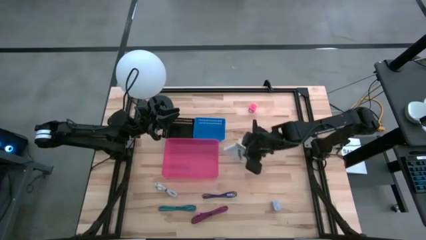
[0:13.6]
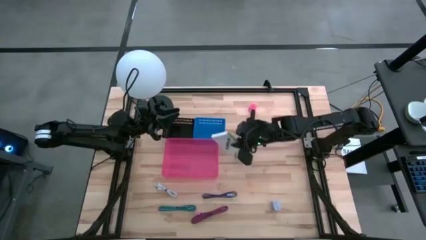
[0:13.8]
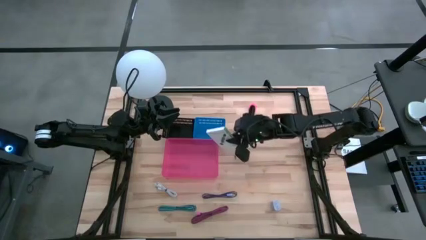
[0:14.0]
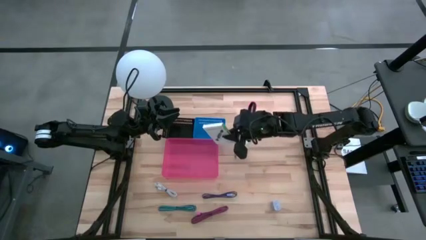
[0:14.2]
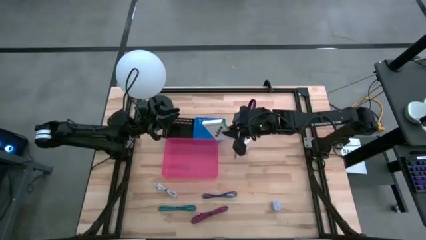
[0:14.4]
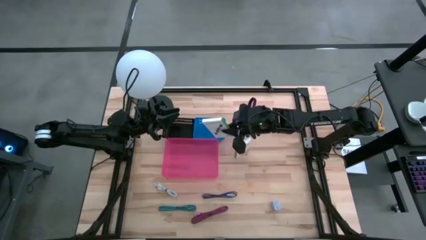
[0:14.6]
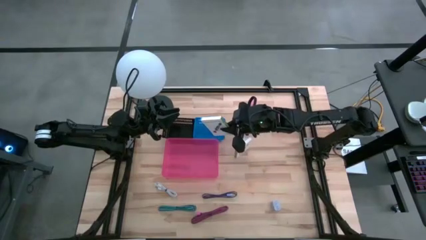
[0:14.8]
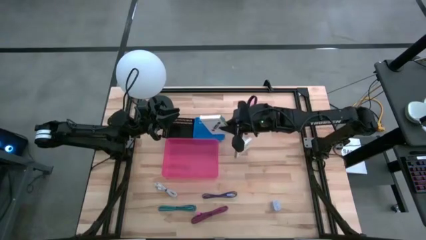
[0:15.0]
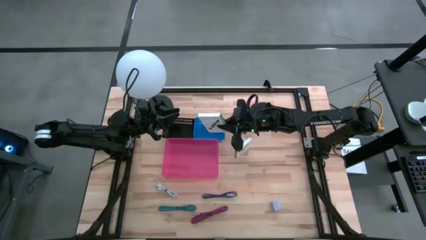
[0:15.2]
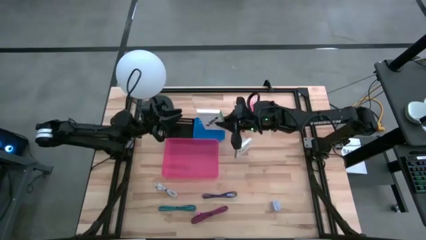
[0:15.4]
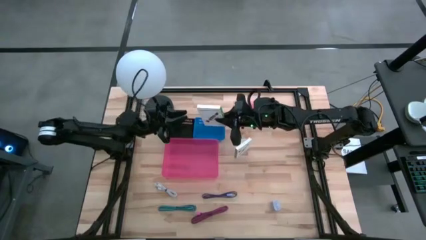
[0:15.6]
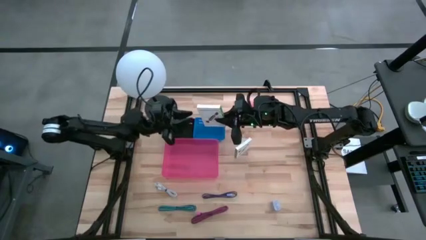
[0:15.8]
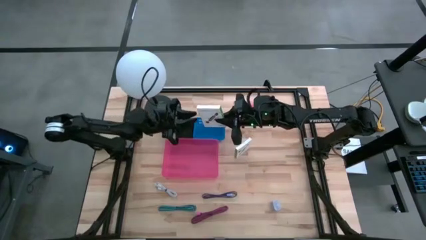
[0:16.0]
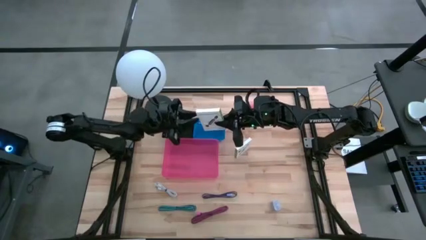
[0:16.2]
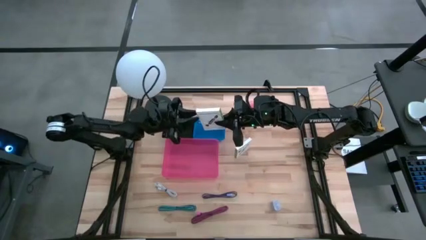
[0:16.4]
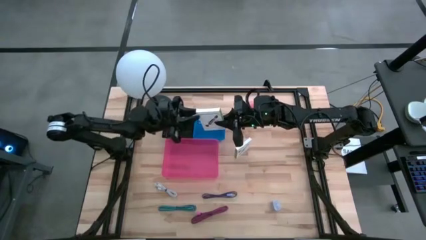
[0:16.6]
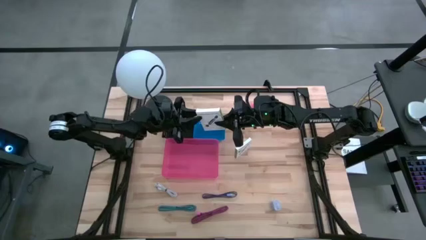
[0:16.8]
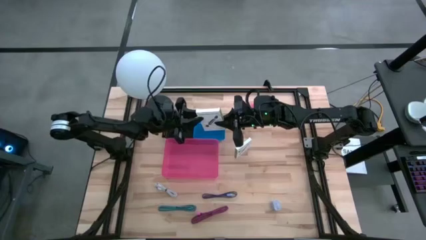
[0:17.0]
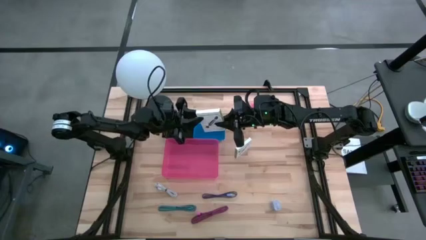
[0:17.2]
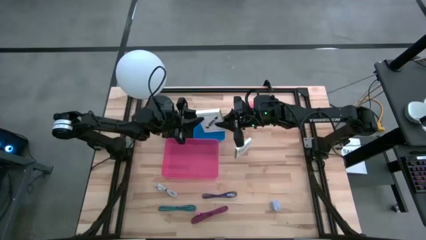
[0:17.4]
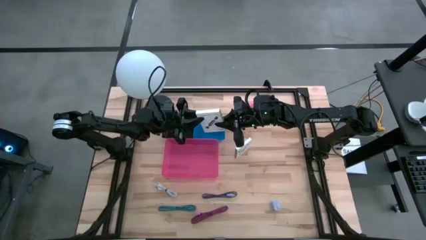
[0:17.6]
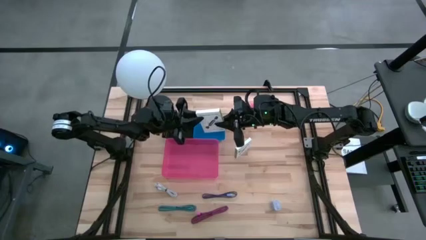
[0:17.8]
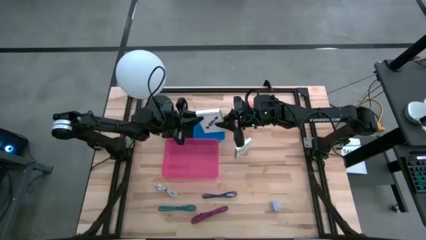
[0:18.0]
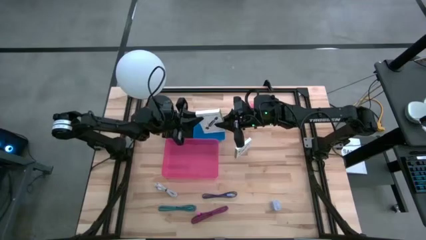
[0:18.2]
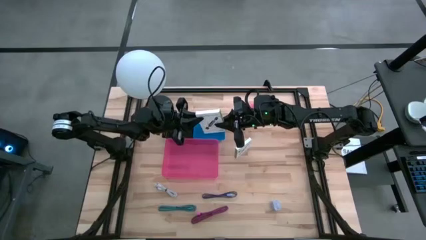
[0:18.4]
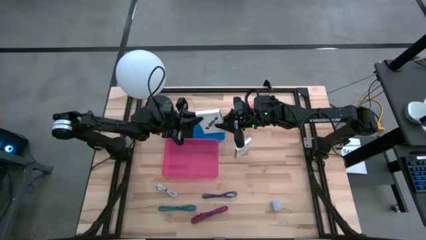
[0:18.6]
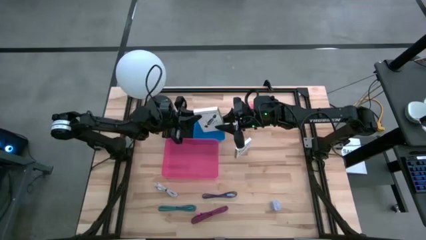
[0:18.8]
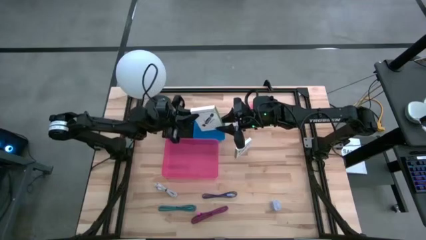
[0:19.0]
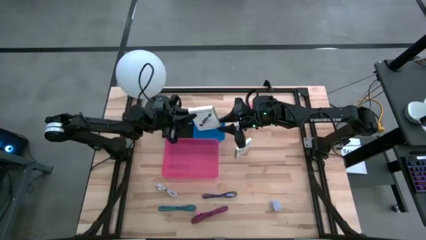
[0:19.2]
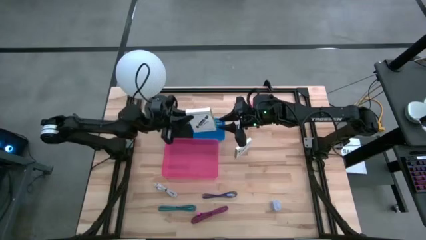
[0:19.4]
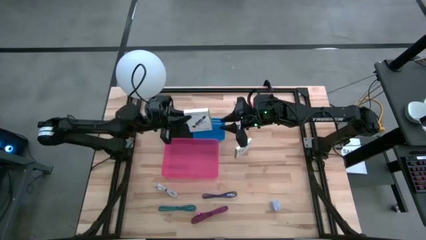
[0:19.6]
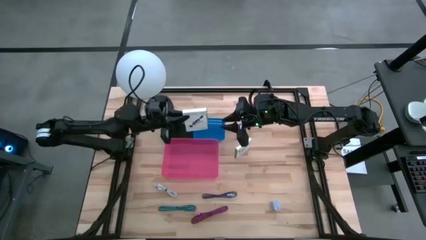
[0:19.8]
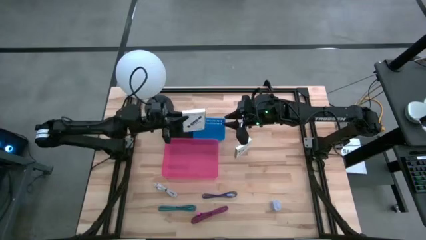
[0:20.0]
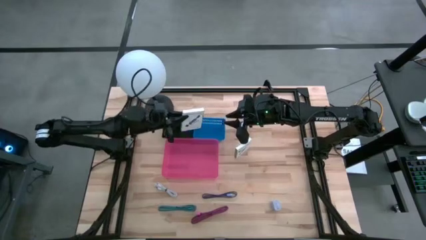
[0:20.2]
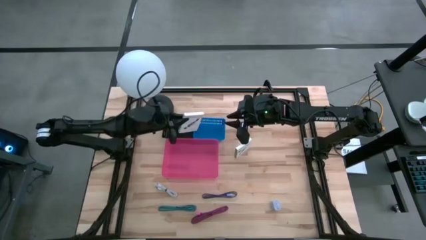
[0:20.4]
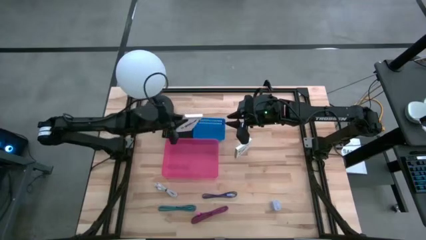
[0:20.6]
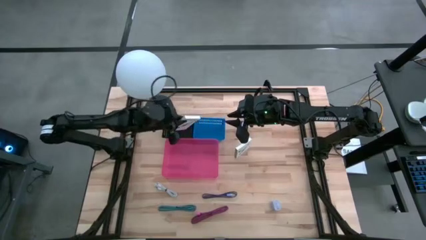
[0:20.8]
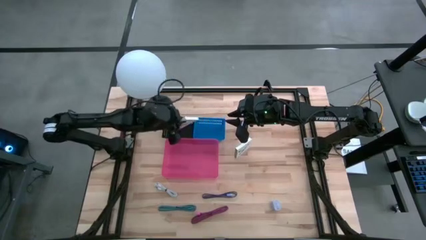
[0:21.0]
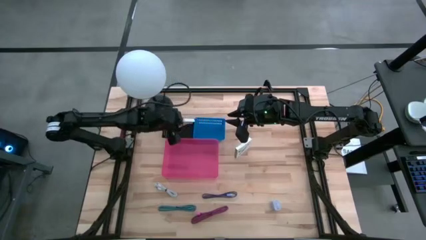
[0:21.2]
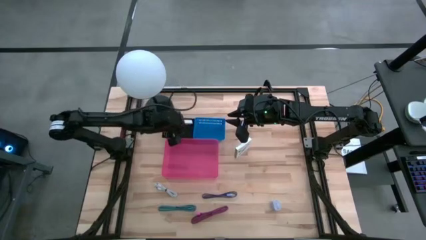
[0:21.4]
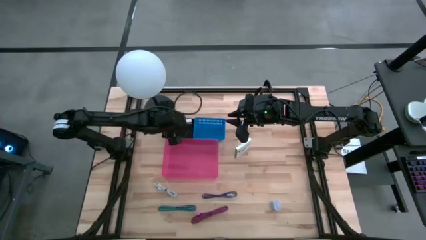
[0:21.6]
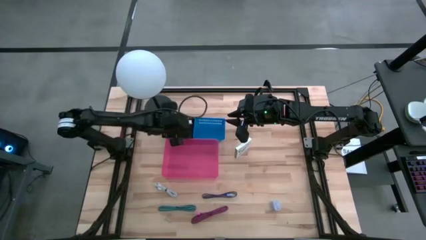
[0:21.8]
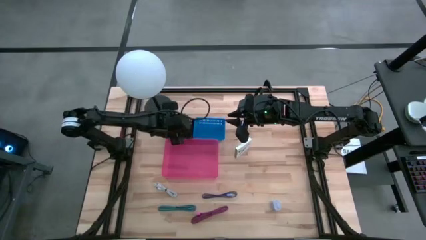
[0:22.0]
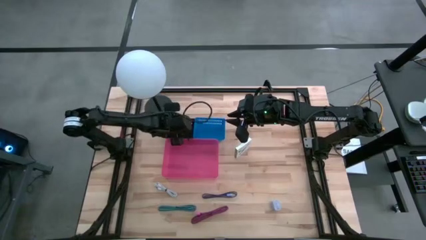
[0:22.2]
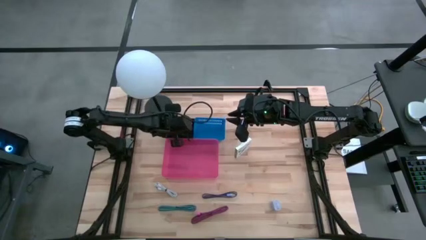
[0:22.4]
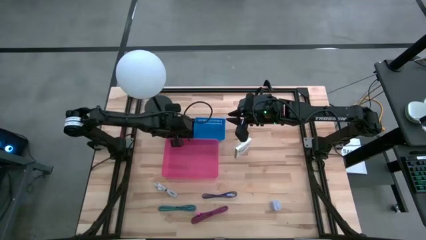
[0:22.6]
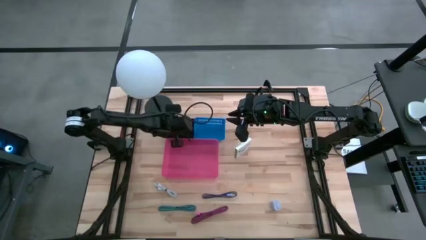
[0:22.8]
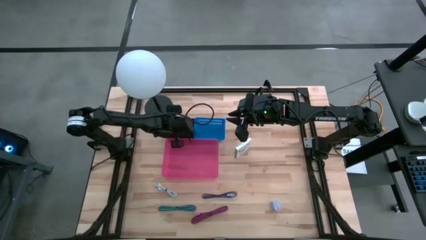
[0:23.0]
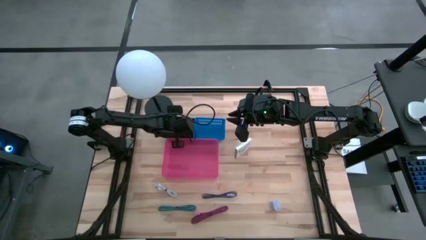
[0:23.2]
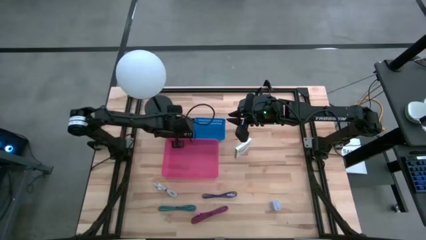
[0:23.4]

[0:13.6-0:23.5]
Task: Pick and place items into bin
Put the bottom card reader box into the black bin

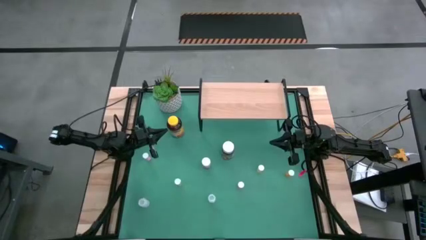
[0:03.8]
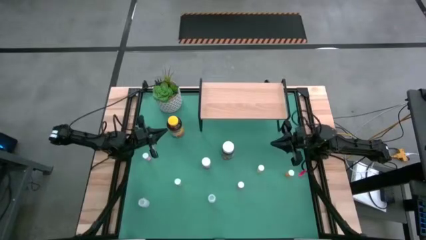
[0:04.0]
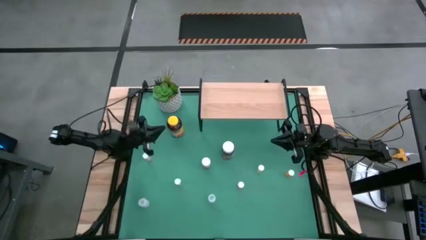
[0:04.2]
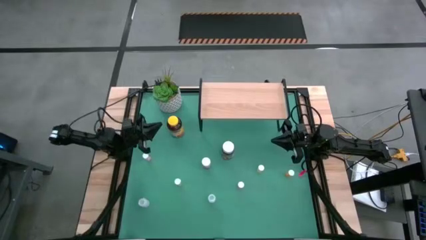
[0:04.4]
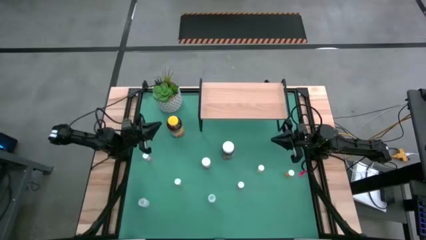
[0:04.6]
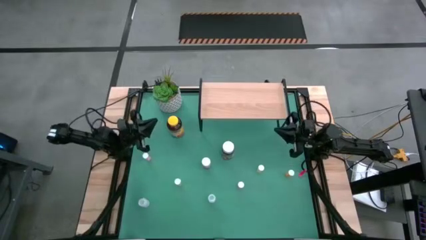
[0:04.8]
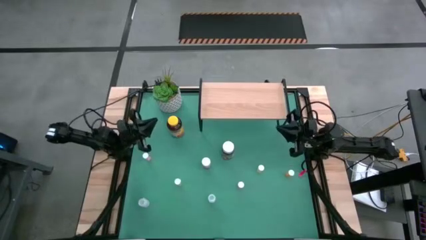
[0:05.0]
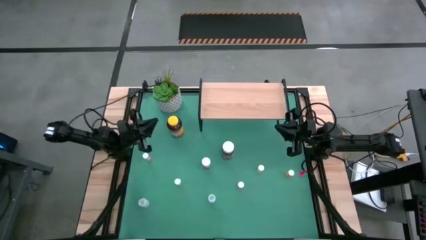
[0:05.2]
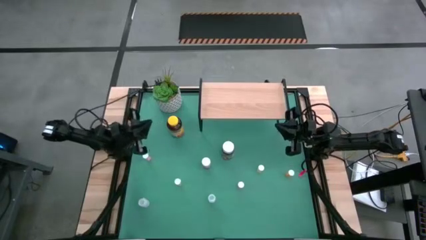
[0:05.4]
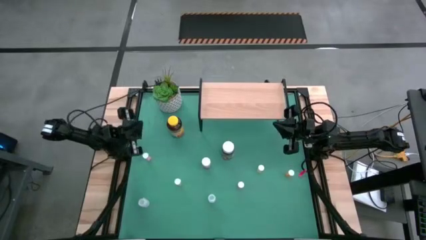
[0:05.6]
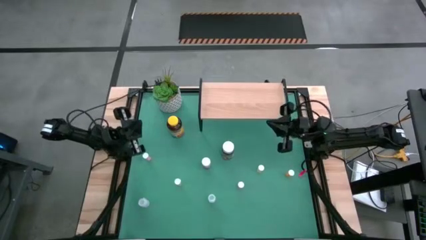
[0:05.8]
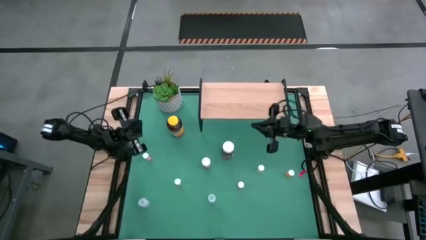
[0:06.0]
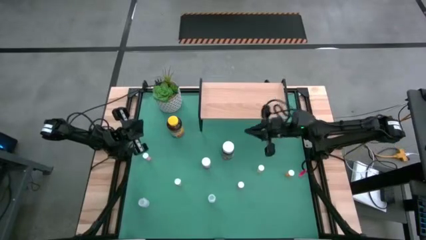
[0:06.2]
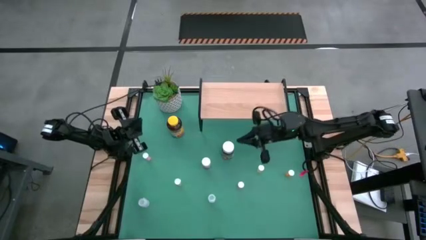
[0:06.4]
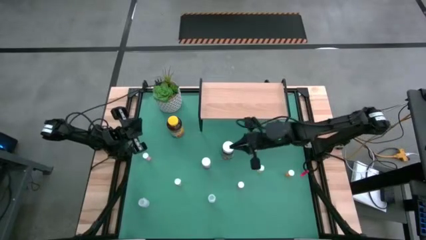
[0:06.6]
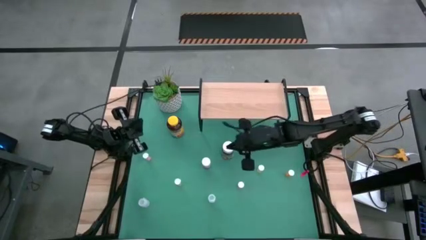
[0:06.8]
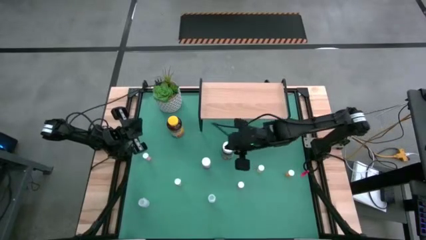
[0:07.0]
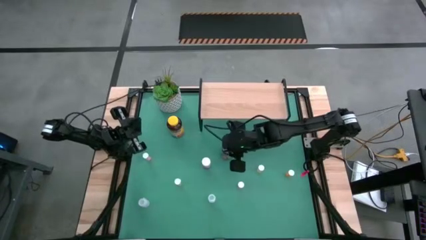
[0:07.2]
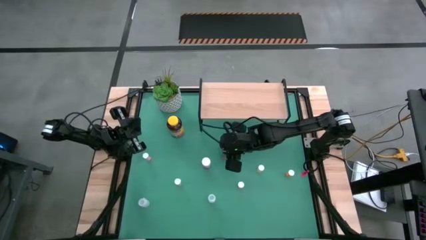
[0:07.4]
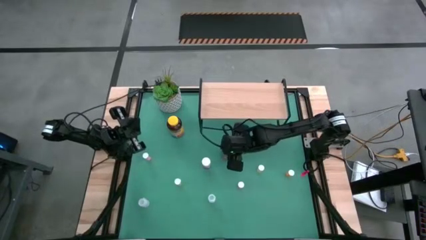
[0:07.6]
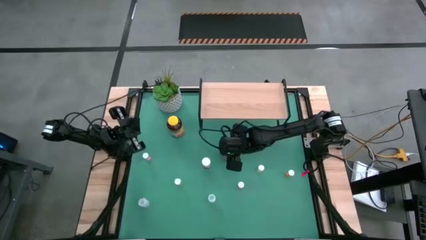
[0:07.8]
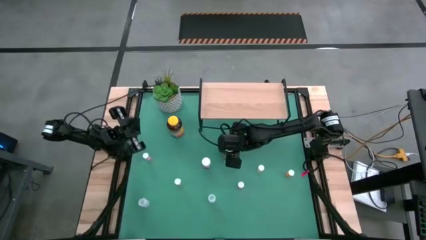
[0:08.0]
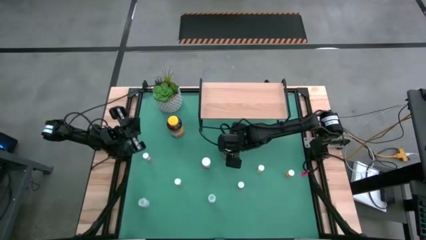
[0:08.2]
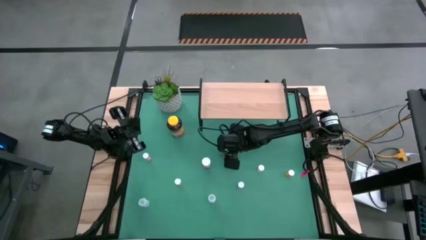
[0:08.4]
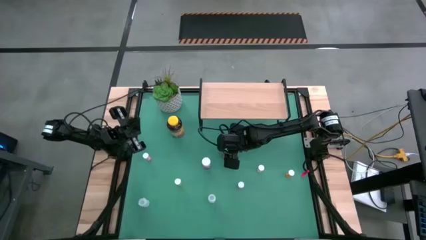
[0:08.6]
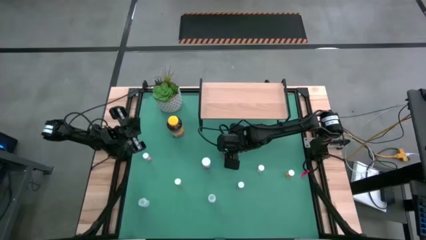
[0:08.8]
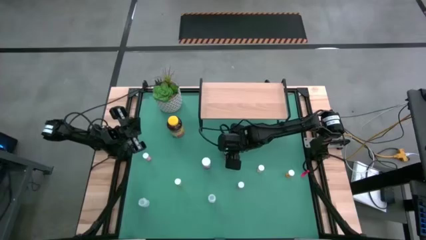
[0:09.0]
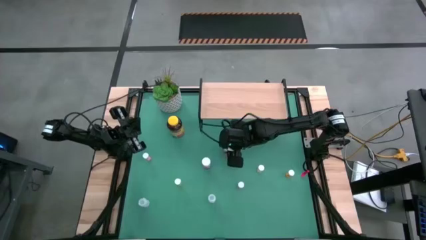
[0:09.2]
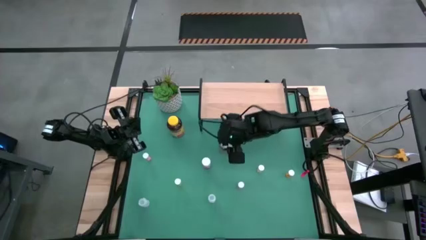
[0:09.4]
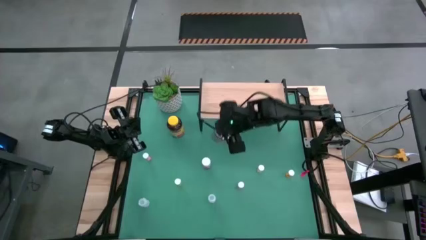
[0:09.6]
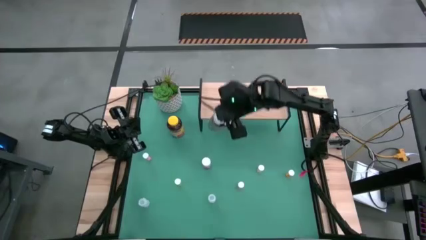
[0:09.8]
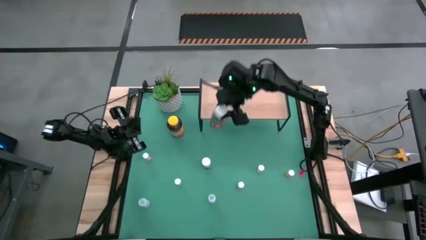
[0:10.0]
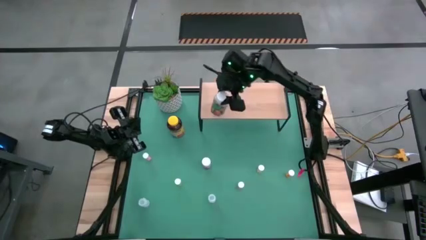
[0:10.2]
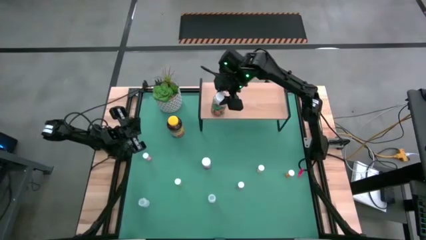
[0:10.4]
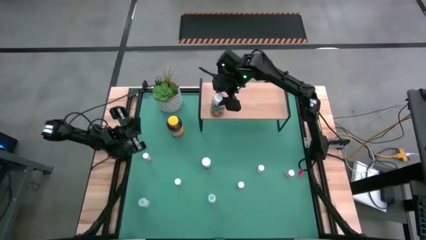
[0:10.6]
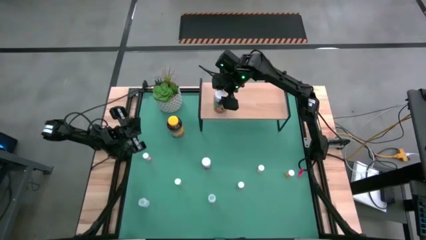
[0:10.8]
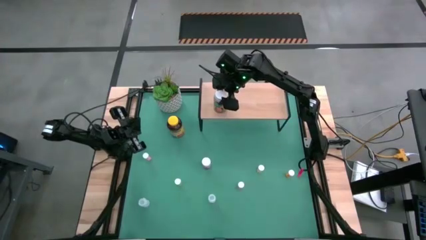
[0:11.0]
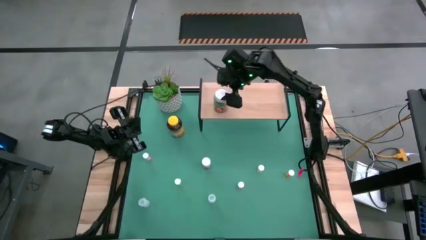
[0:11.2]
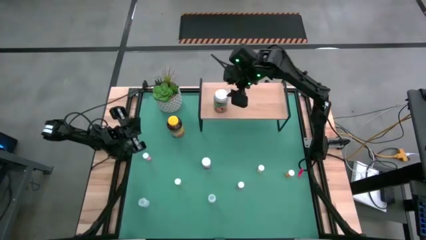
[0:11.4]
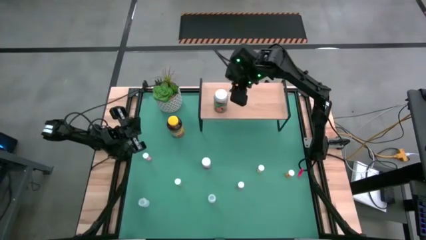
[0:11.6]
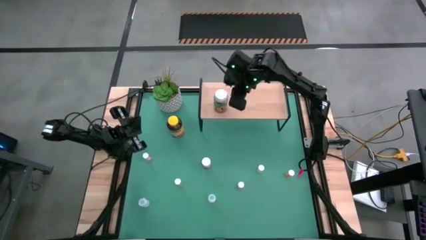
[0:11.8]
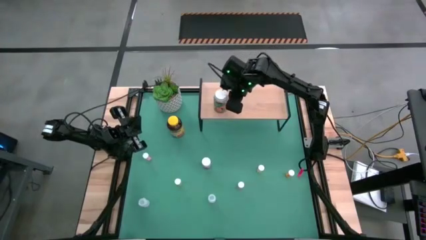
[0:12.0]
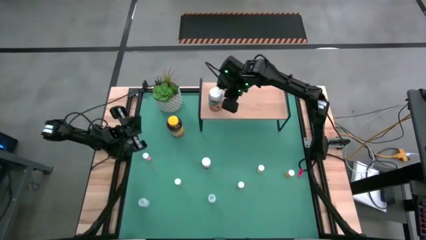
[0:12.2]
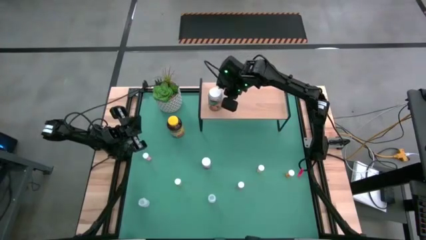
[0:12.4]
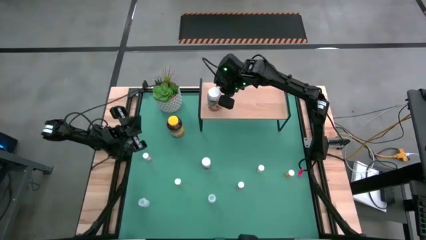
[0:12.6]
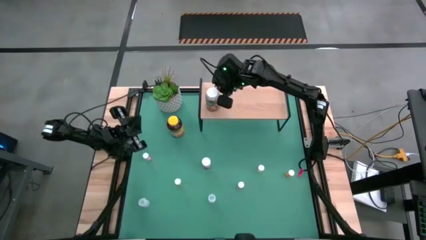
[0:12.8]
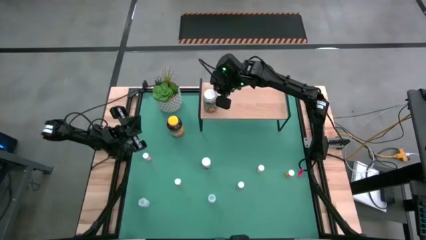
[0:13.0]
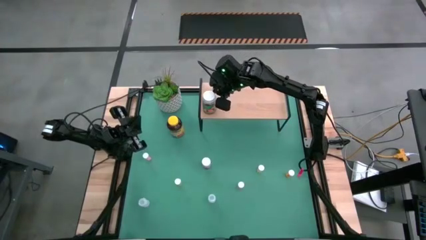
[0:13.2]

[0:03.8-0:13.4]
Task: Pick and place medicine bottles onto shelf by color
Put the green medicine bottle on the shelf
